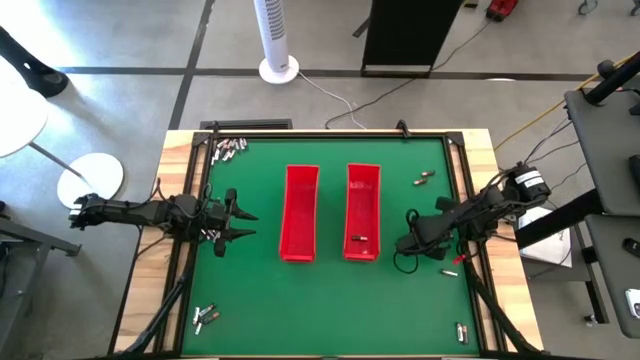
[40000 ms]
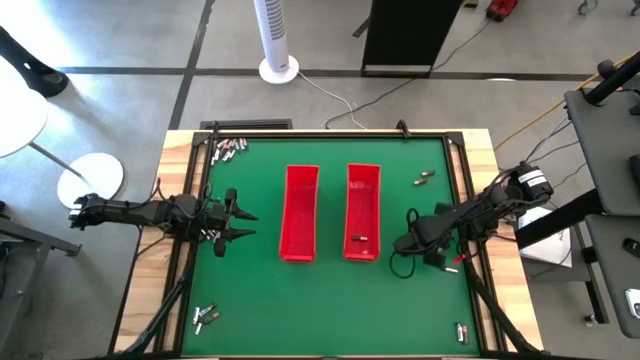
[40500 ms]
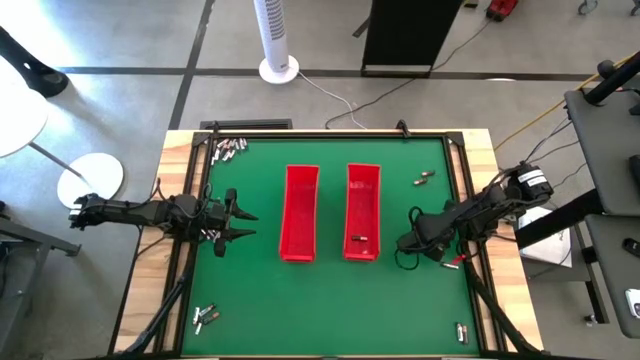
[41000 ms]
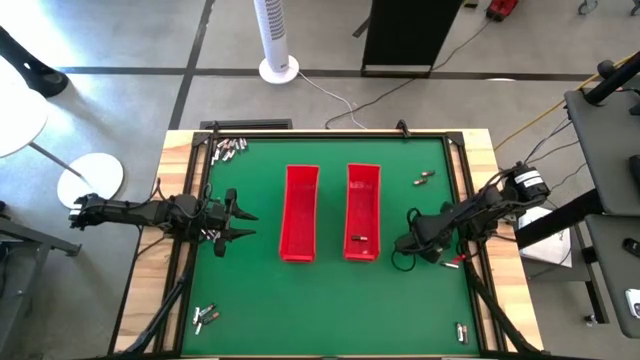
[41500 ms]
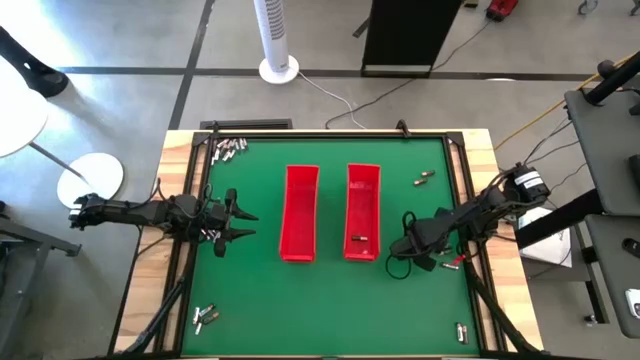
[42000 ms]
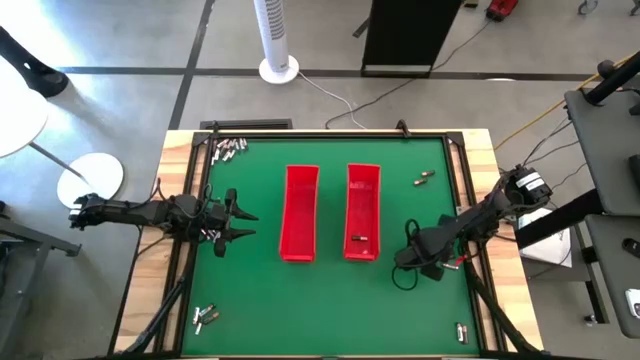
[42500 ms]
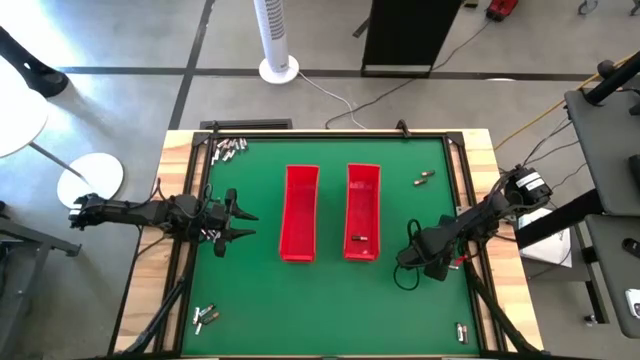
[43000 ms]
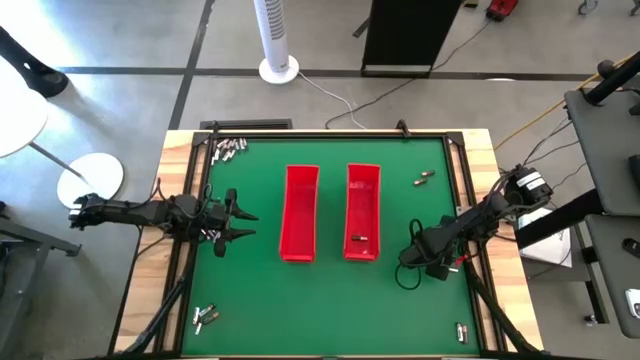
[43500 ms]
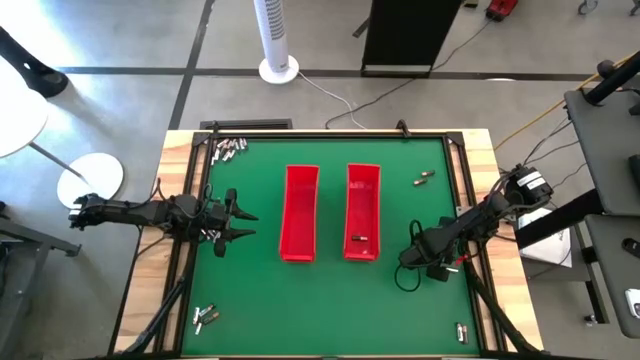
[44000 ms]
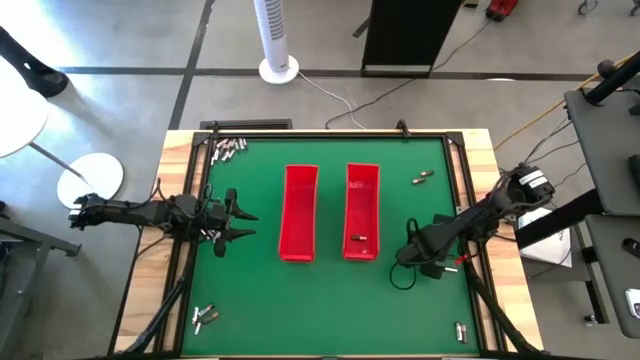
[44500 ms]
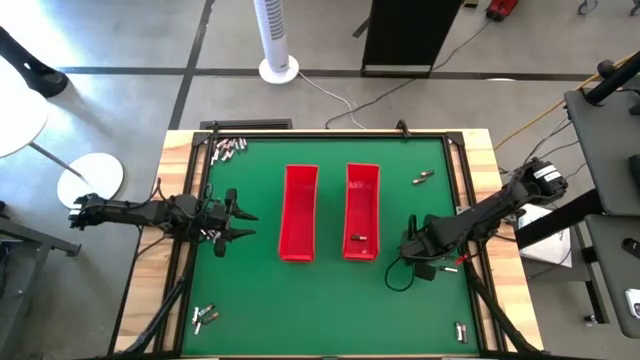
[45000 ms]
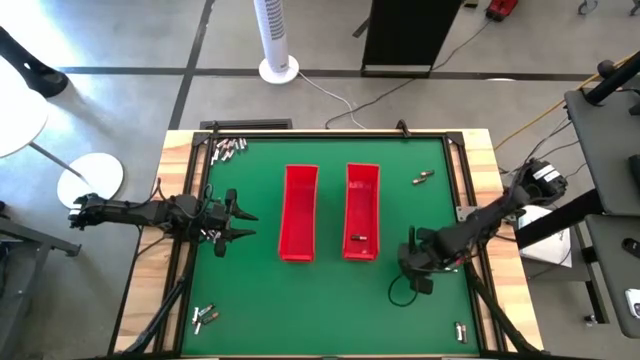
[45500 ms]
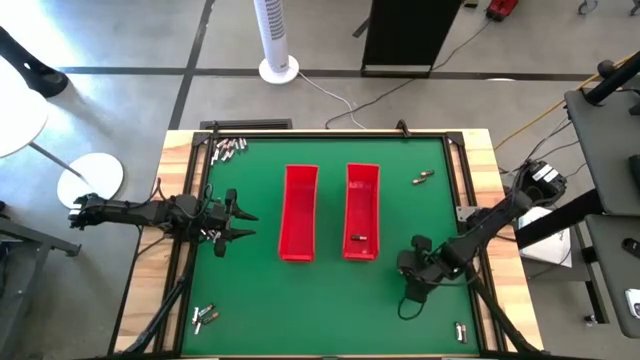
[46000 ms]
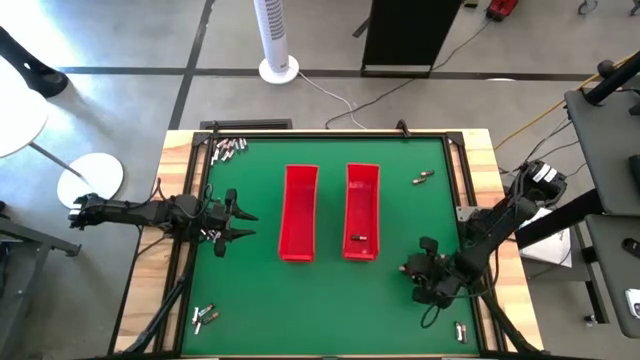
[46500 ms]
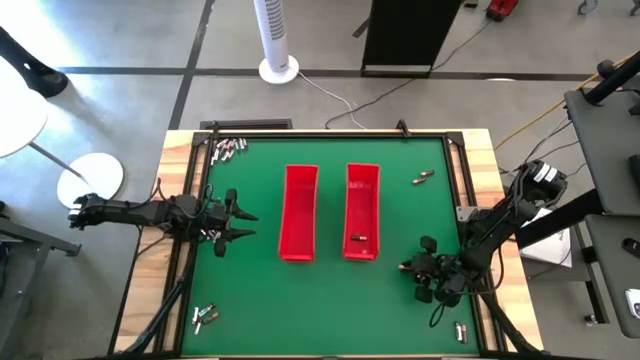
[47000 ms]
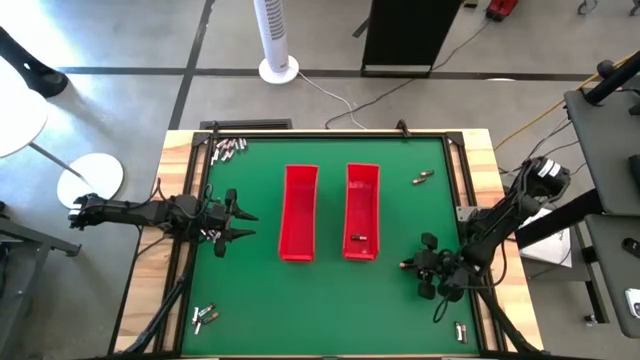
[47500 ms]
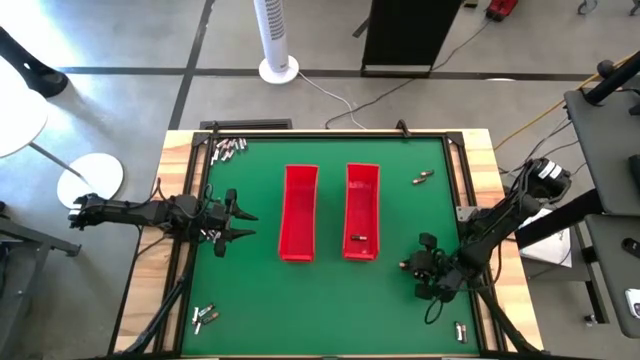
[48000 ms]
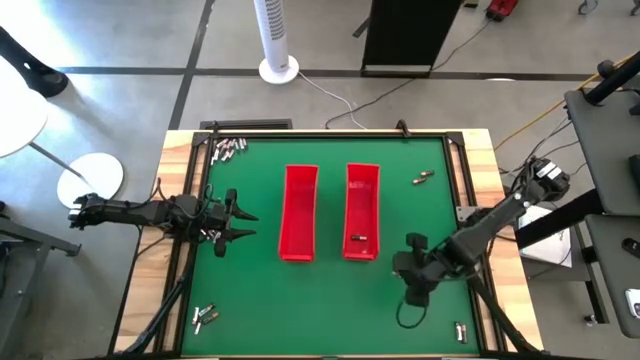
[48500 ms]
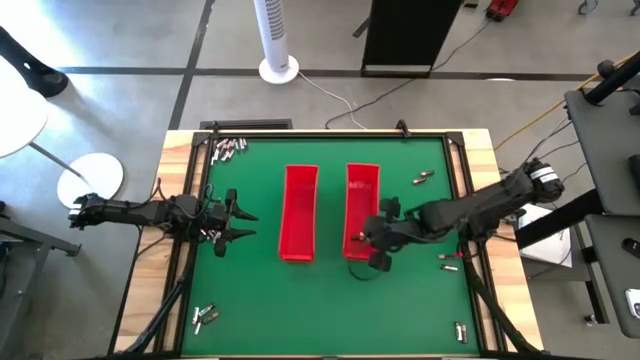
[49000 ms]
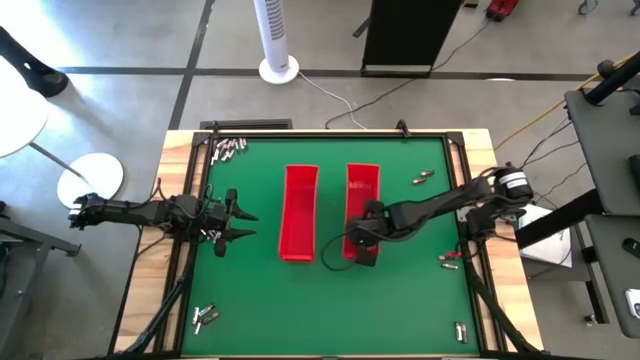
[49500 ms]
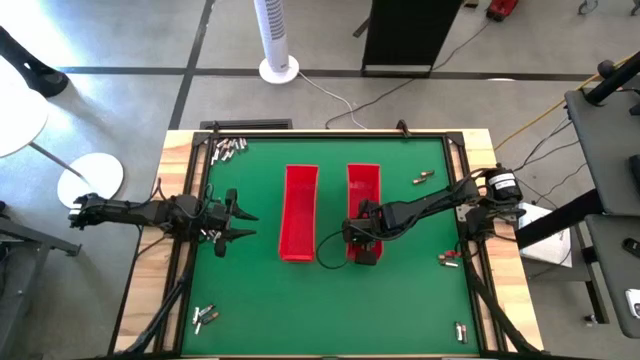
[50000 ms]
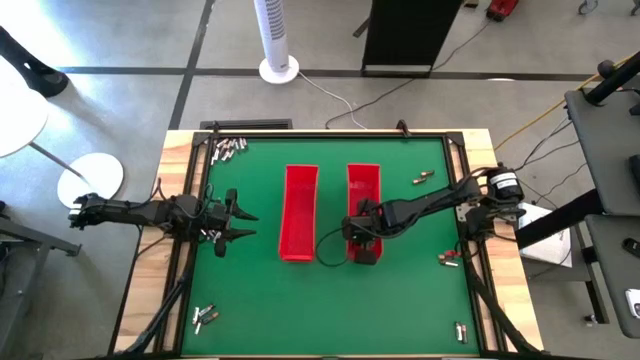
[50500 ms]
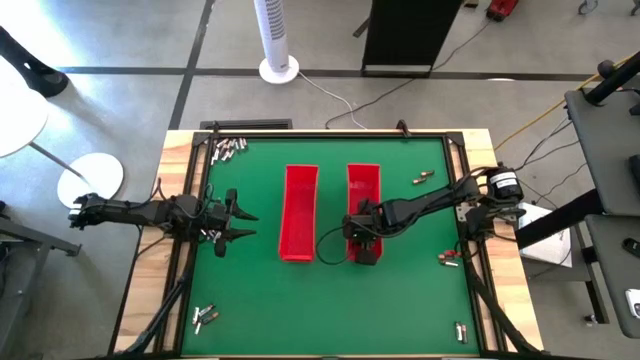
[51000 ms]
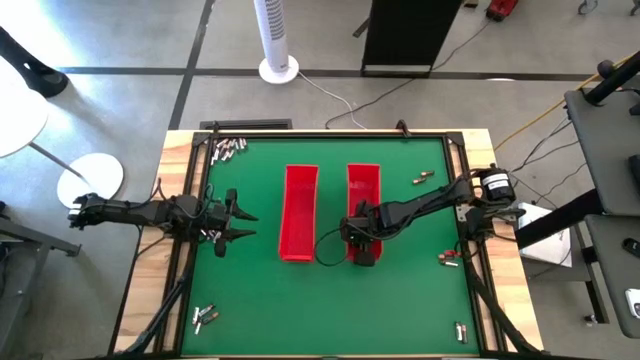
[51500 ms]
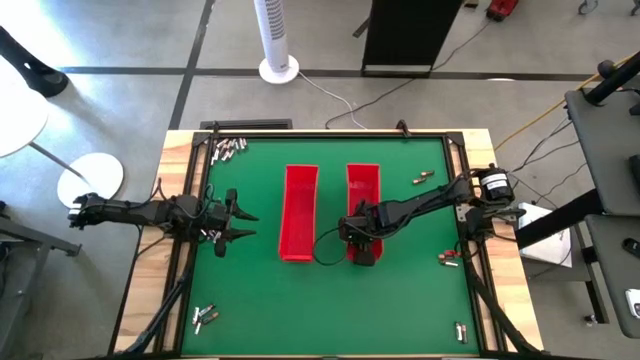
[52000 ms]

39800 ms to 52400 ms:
Task: Sort batteries
Put the black battery into the right red bin

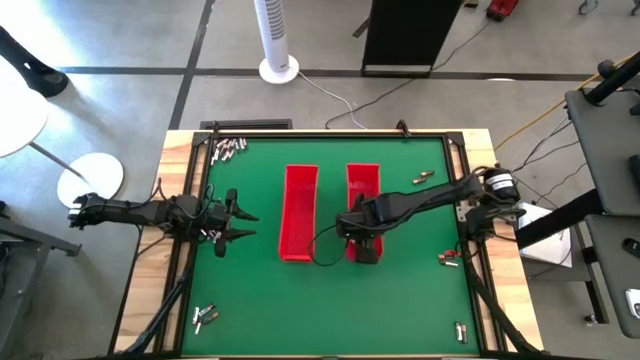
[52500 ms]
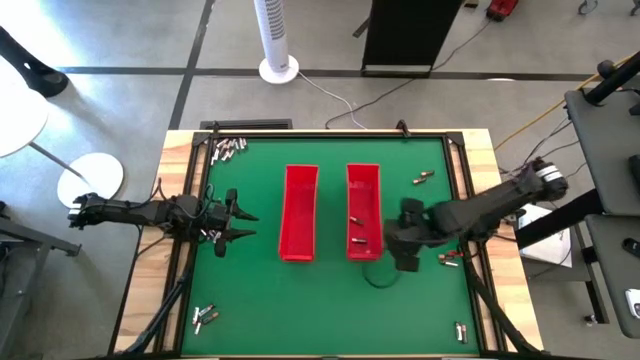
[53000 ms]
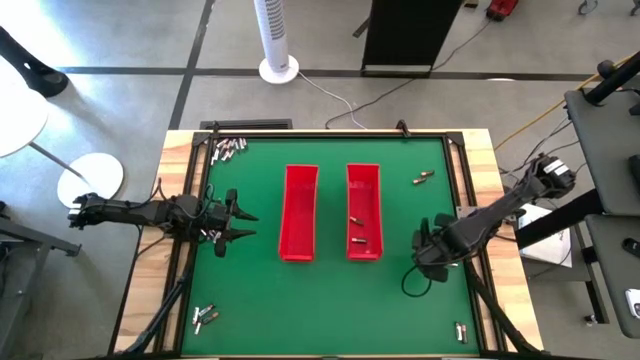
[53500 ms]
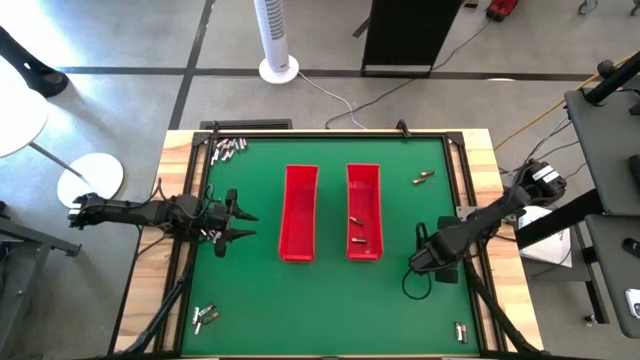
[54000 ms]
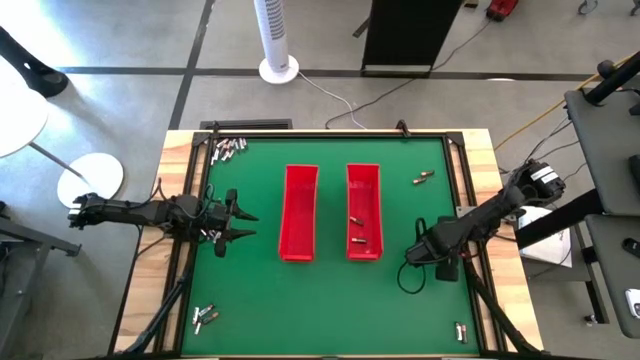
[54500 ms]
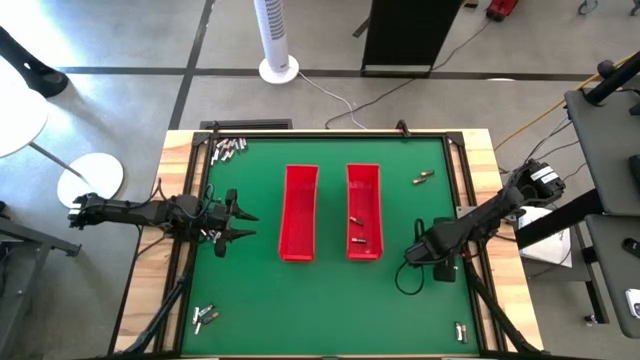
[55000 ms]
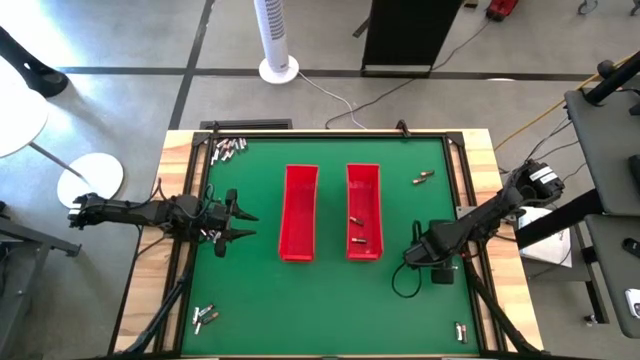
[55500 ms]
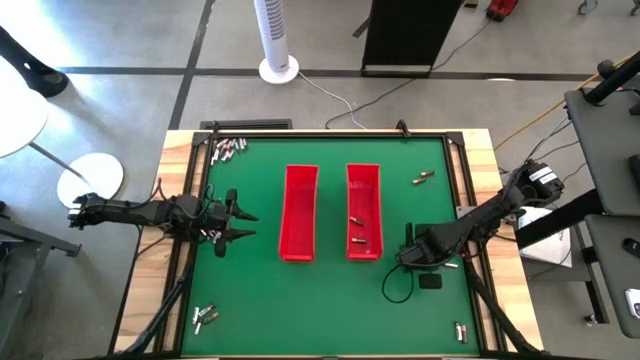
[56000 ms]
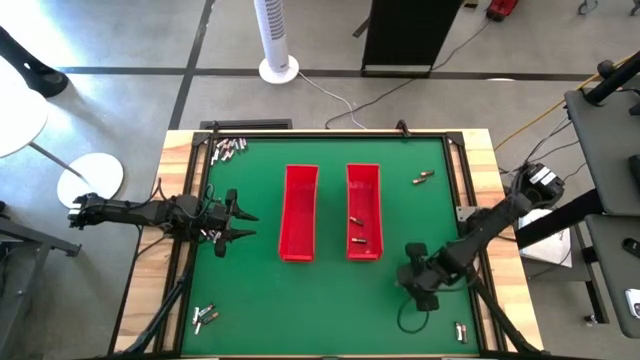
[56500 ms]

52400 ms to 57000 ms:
Put the black battery into the right red bin

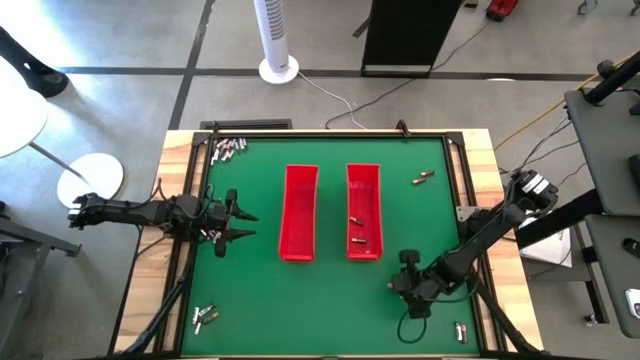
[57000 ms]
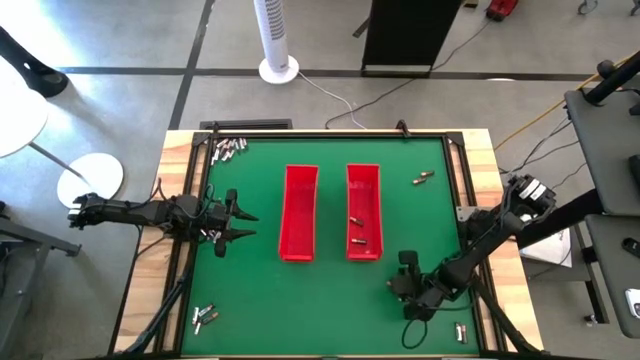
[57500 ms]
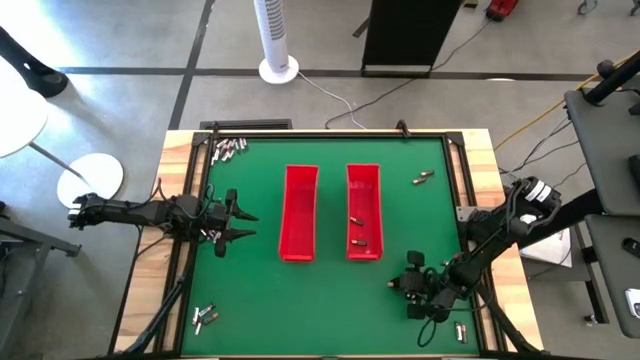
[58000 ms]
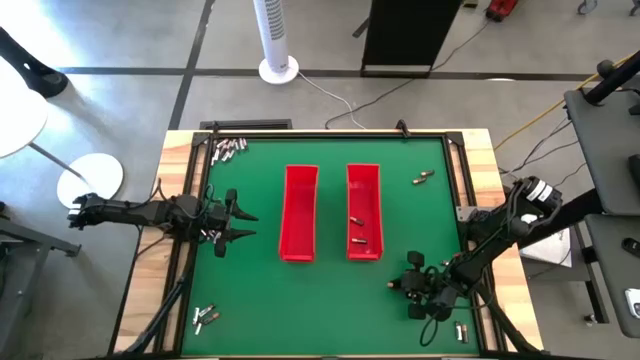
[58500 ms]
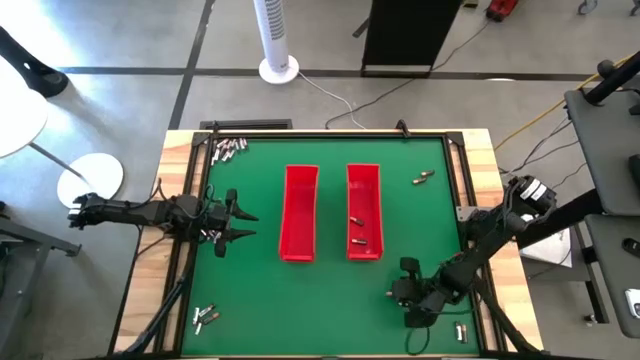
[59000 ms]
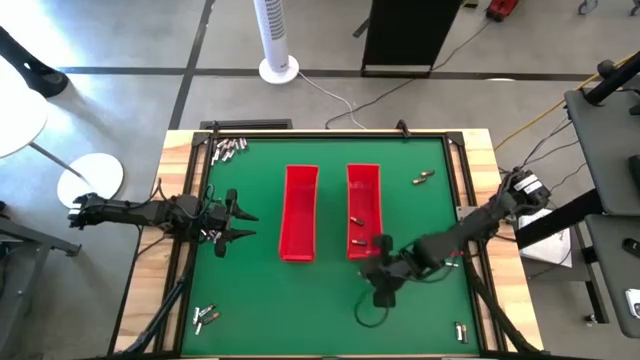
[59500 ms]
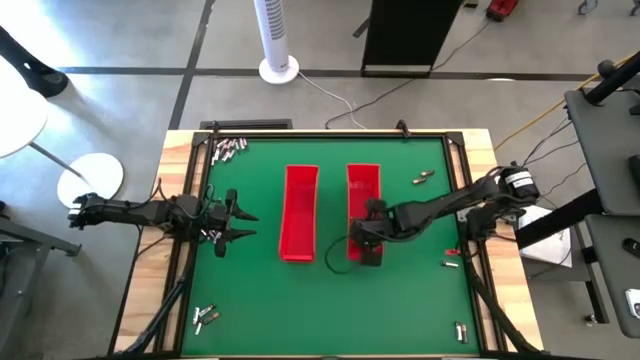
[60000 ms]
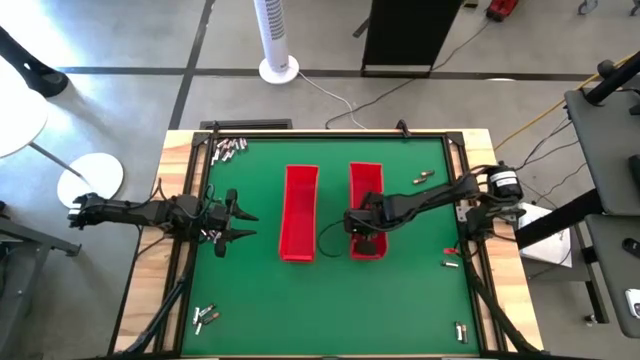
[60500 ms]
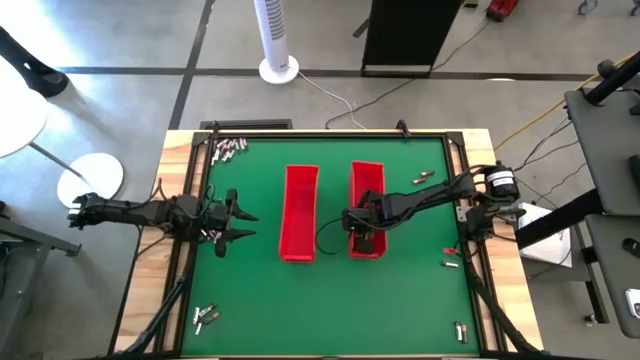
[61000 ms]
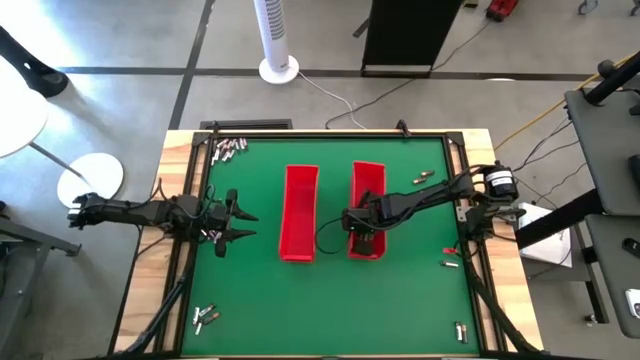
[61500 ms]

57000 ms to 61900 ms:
Put the black battery into the right red bin
